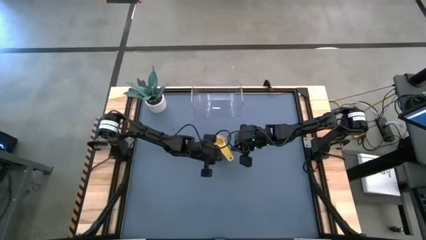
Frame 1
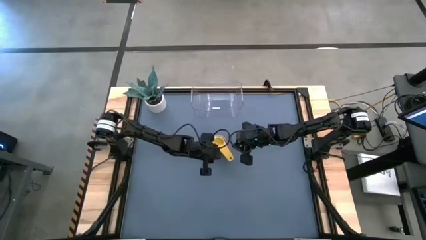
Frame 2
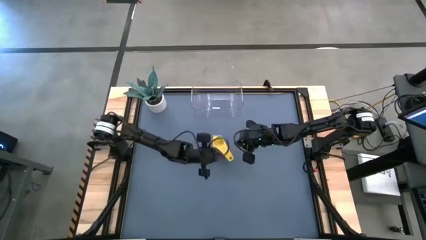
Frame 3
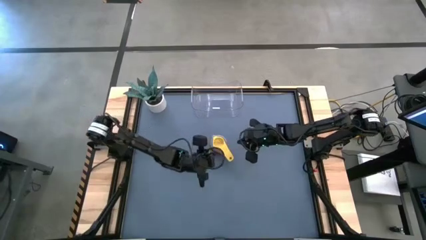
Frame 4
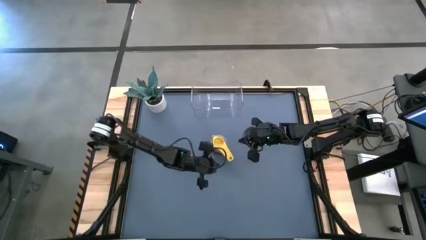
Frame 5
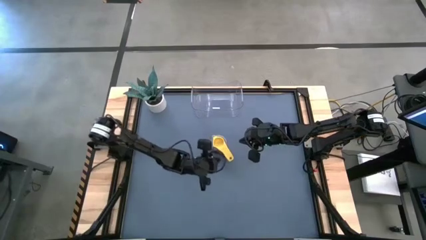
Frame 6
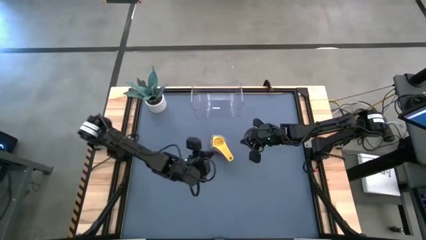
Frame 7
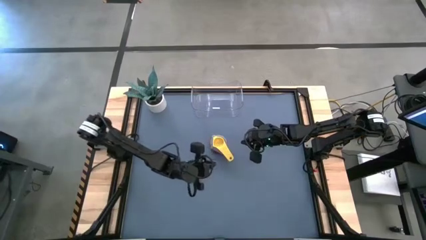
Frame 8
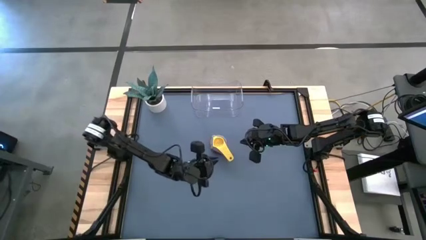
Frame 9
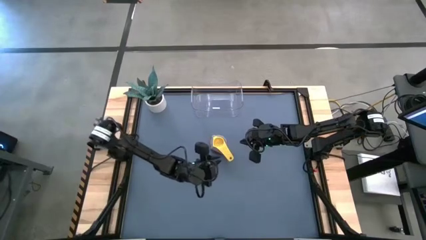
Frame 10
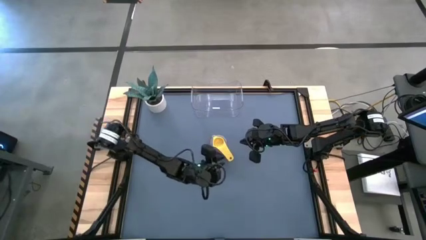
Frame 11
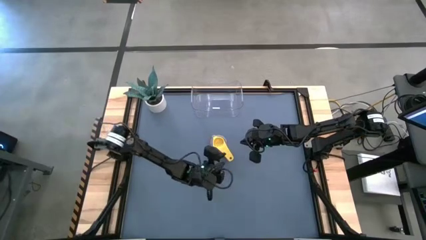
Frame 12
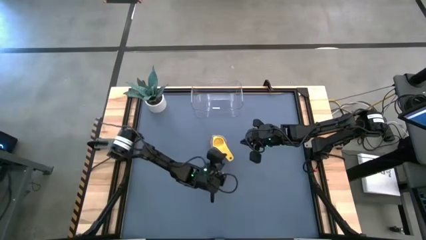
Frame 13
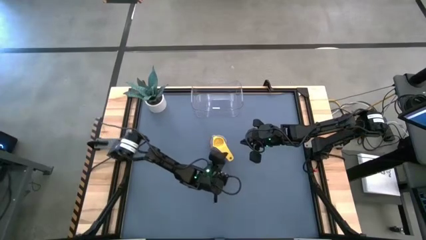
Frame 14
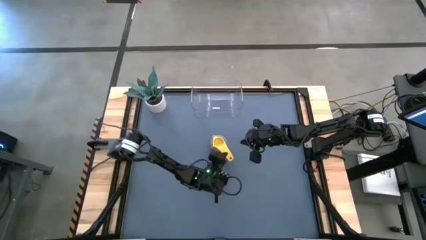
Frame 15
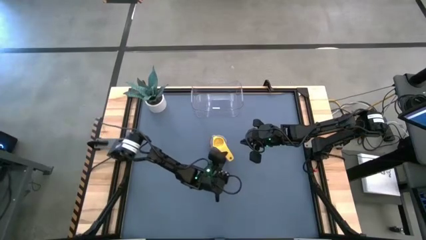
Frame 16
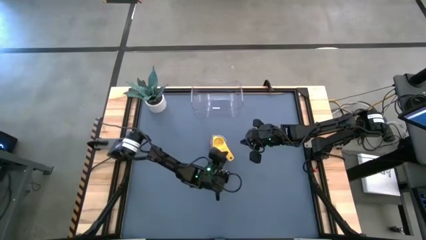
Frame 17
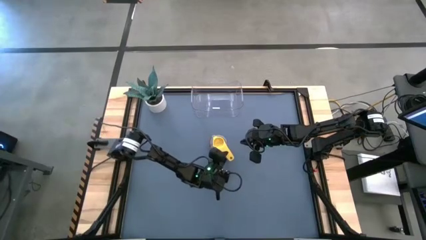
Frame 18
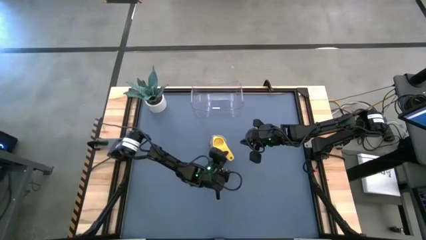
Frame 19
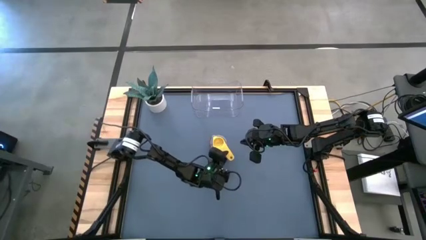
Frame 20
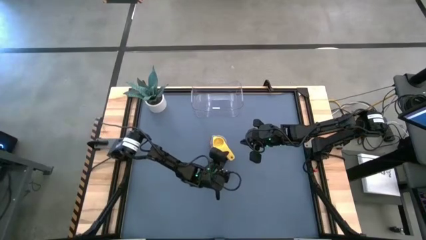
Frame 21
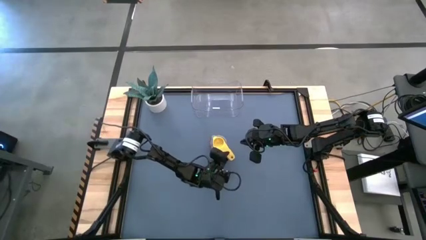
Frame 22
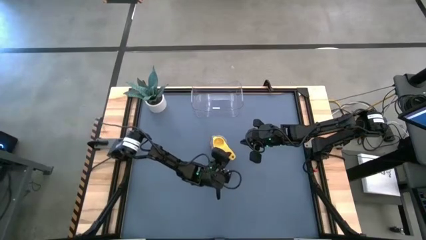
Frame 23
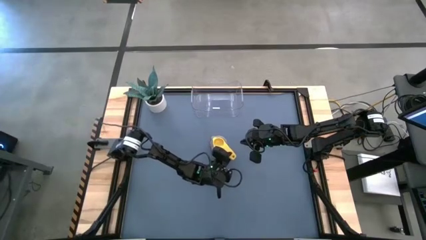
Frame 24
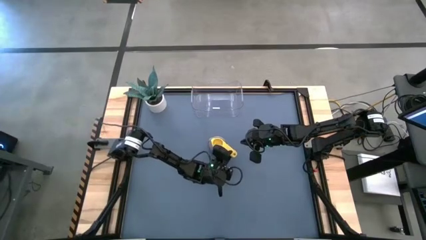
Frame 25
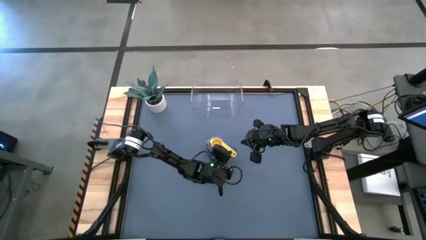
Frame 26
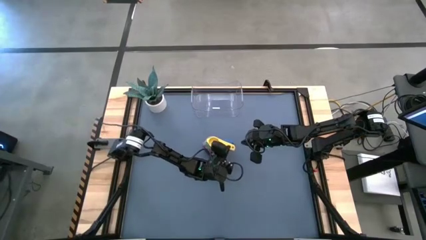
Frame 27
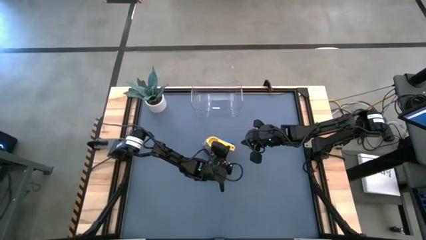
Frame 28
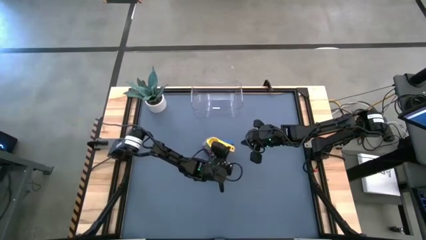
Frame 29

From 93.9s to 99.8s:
Task: Nest measuring cups in basket
Put the nested measuring cups into the transparent bin

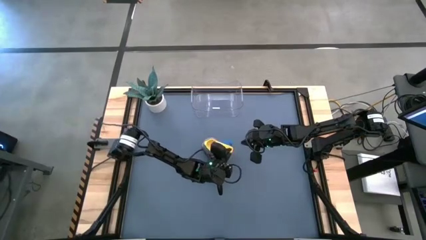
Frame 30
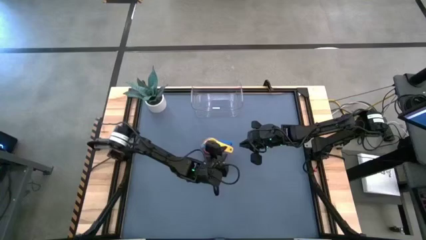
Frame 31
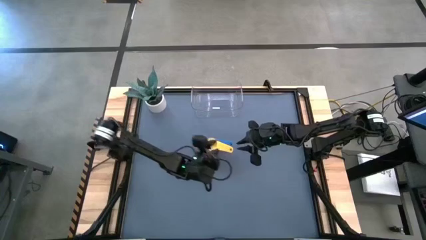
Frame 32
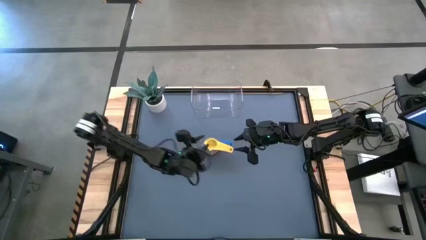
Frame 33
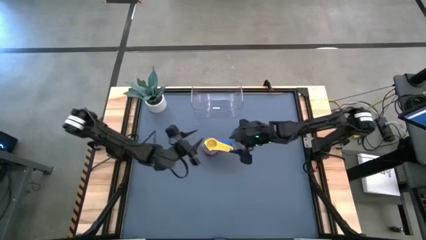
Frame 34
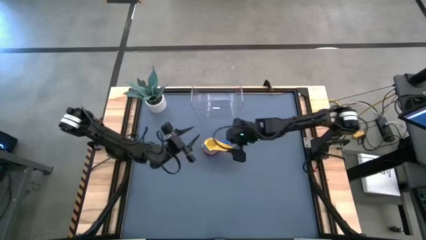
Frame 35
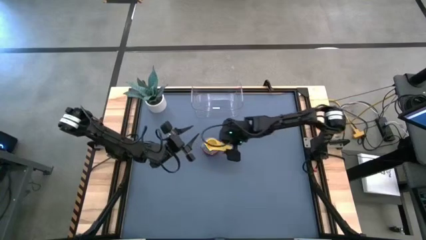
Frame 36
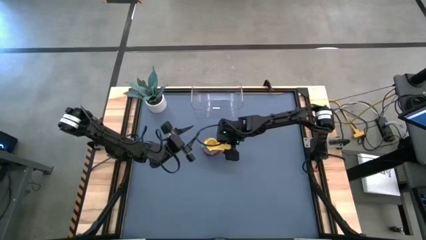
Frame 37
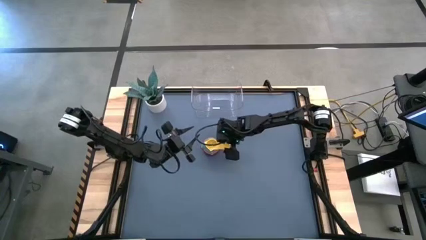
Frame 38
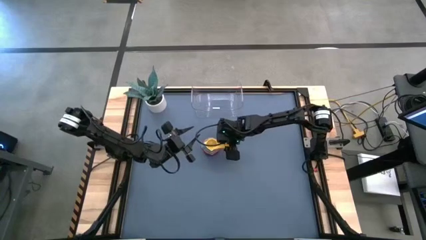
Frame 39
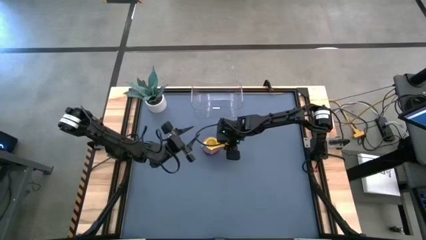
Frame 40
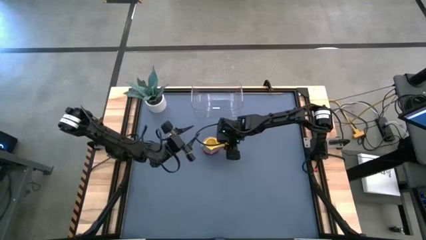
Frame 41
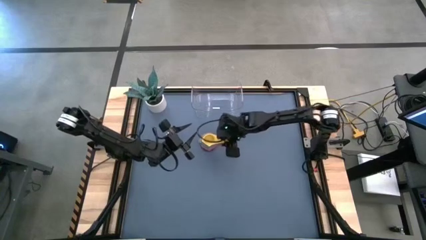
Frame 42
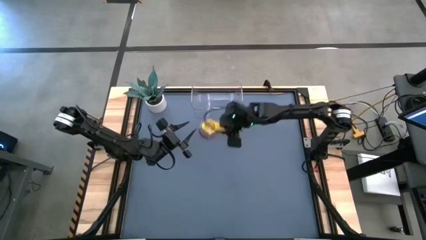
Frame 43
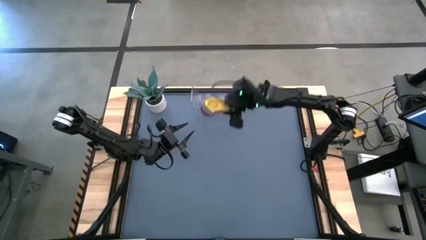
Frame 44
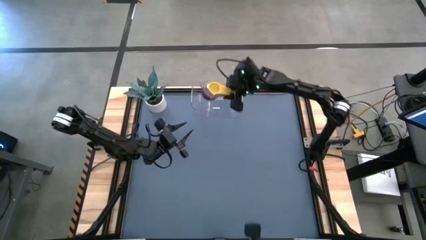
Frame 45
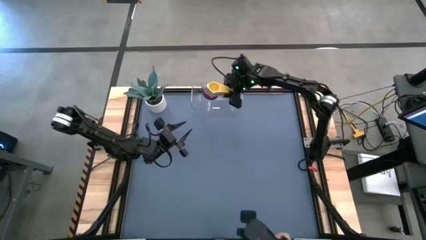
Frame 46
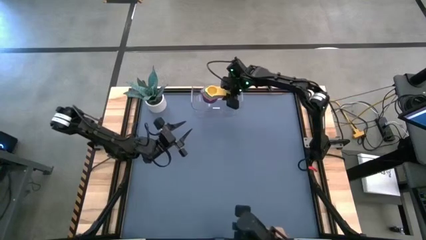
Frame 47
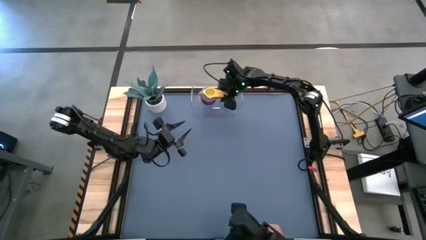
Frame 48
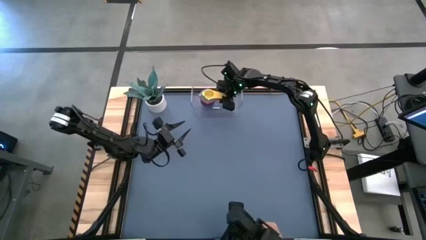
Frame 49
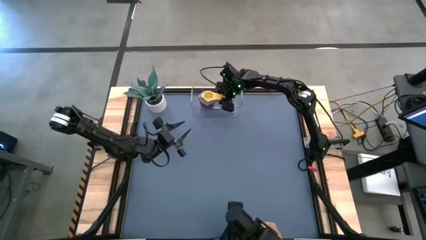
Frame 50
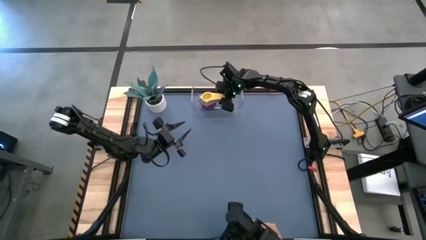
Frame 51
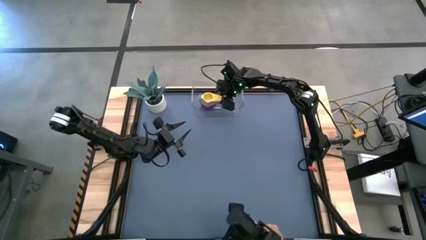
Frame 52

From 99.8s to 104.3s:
Put the nested measuring cups into the transparent bin

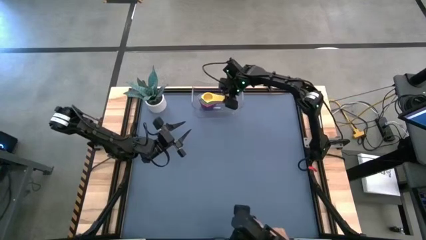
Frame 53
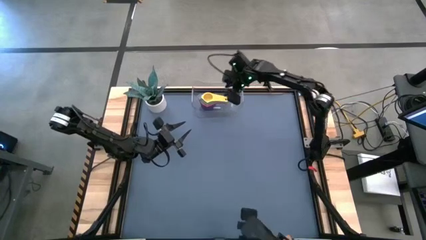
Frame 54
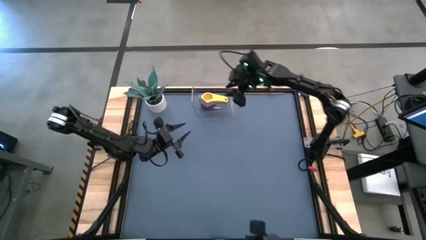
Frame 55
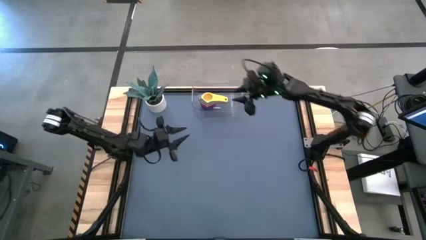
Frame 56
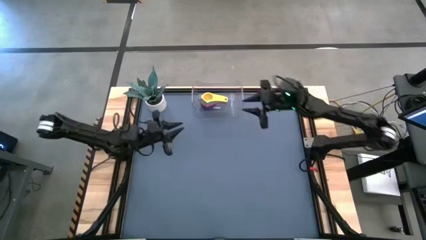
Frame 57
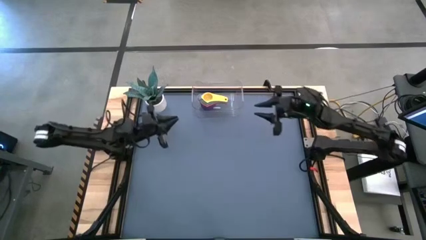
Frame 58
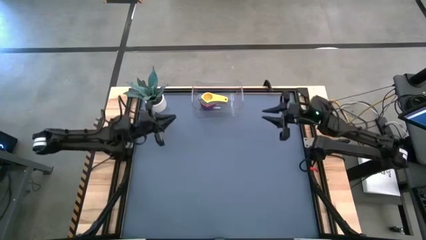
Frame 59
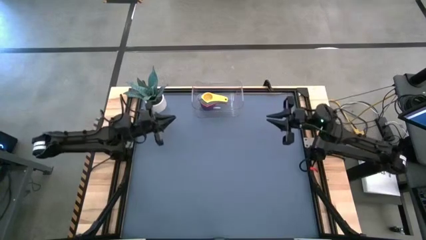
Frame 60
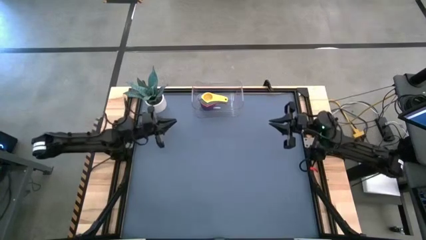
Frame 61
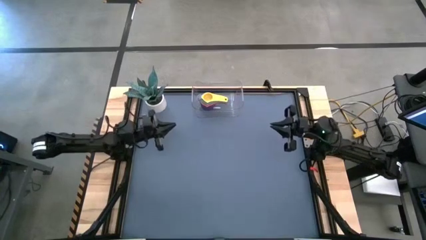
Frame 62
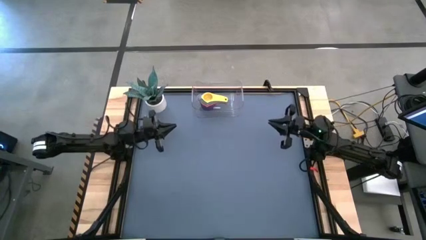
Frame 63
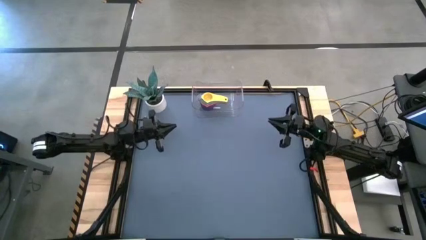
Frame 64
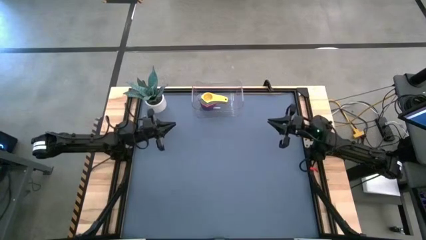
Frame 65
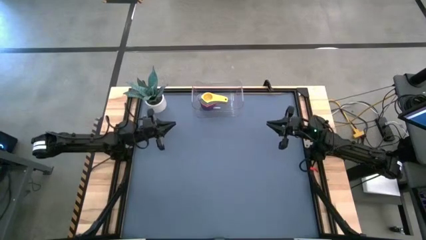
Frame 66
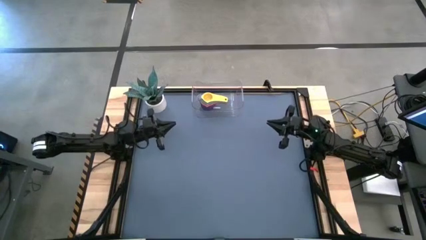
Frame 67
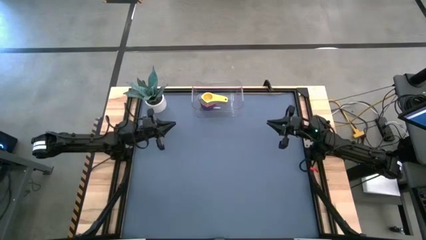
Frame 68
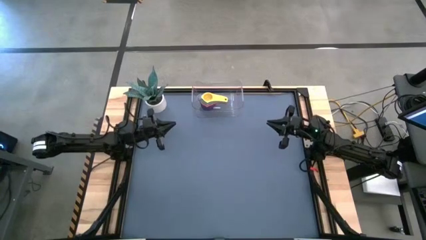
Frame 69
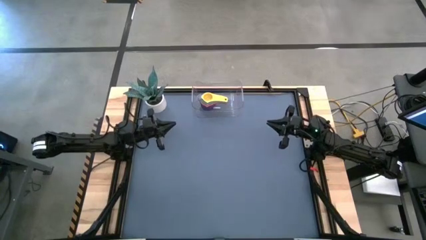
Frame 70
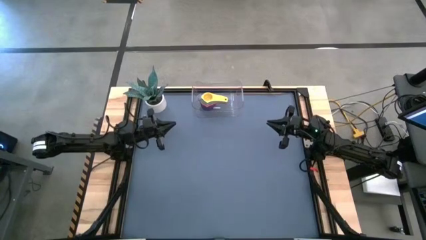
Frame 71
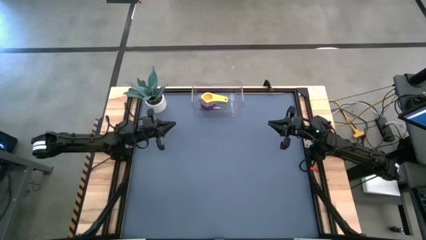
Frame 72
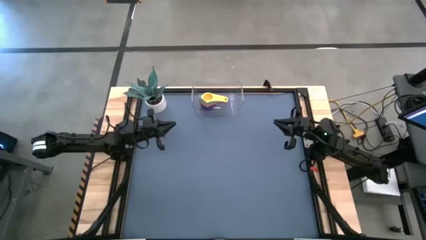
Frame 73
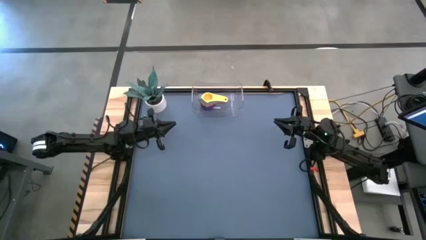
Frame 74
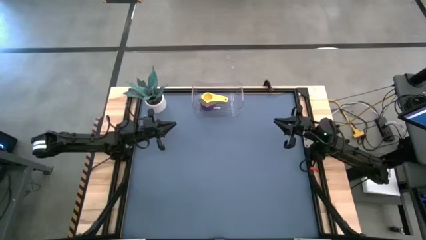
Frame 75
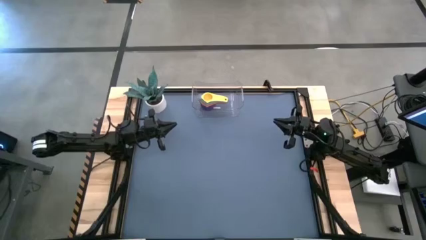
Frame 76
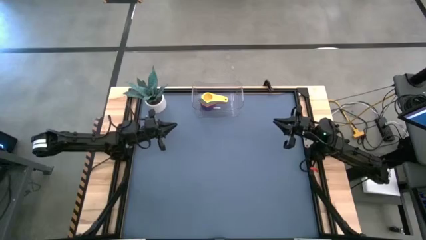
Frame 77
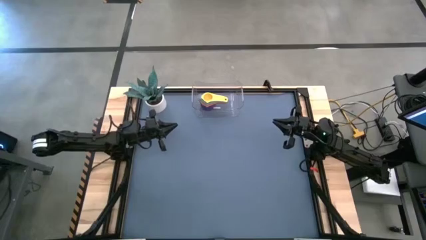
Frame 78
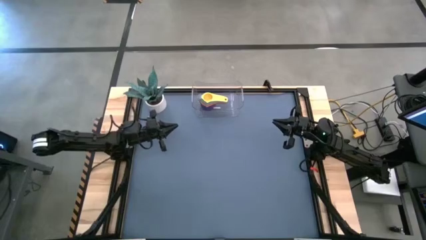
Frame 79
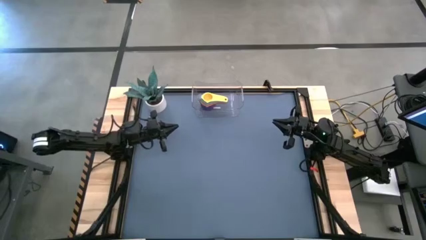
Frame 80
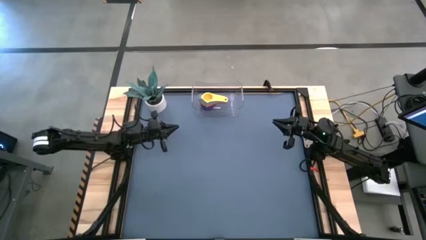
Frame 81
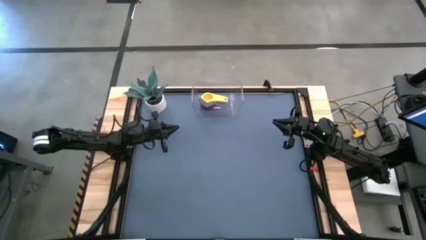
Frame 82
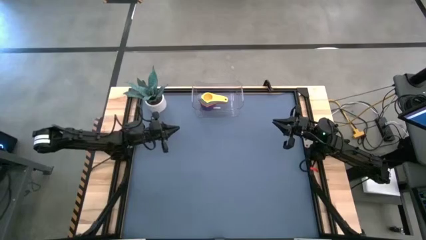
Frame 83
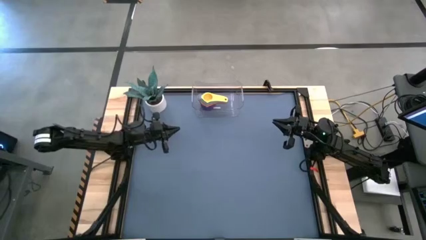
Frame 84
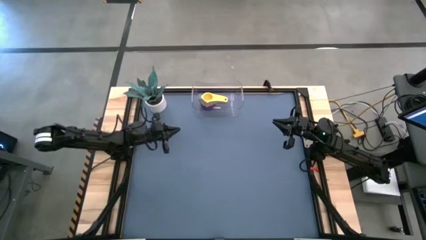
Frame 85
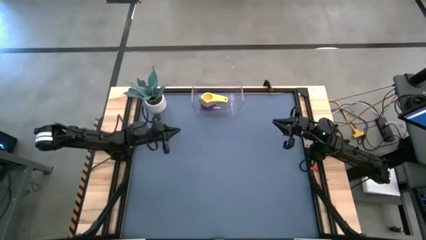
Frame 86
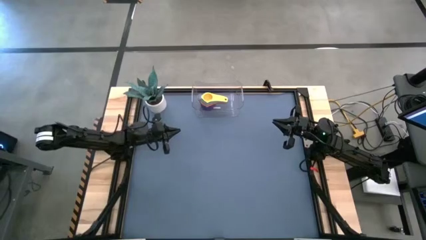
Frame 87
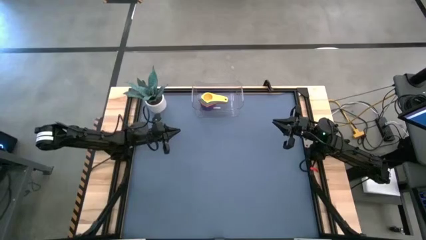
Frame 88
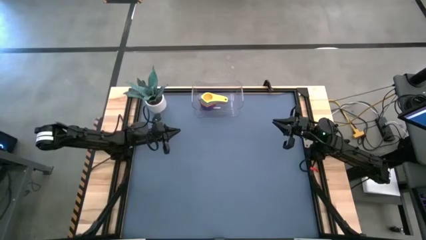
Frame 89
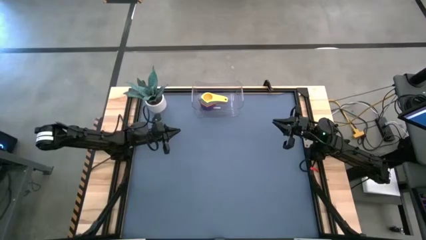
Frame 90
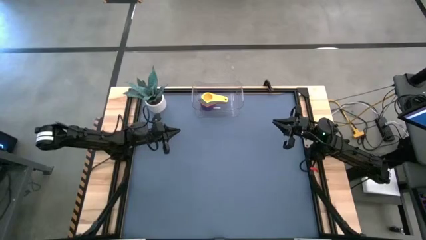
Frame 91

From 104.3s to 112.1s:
Return to Home Position
